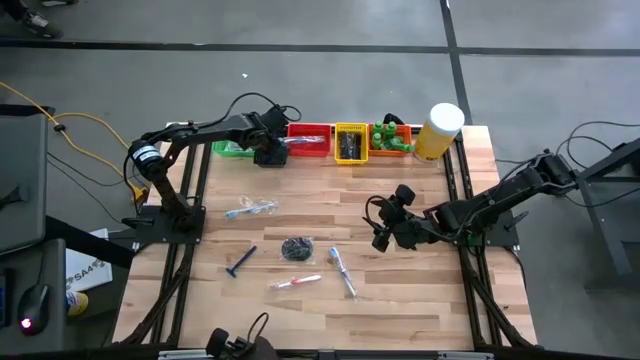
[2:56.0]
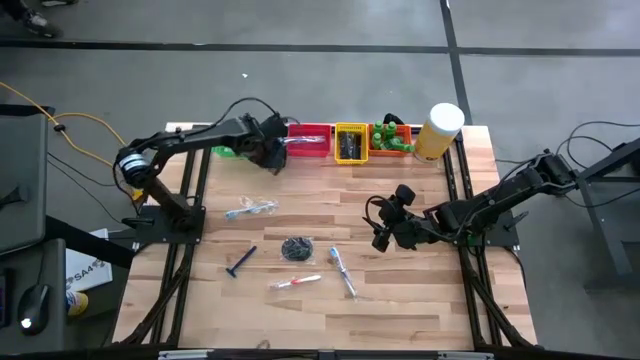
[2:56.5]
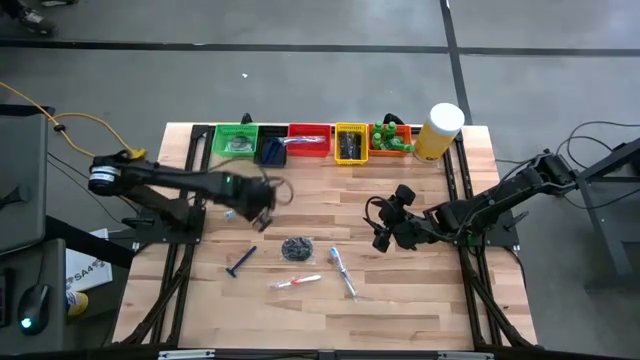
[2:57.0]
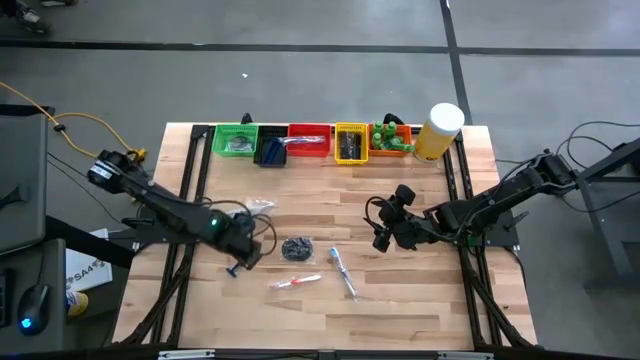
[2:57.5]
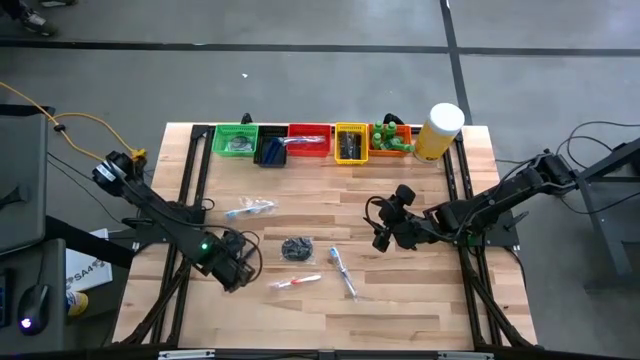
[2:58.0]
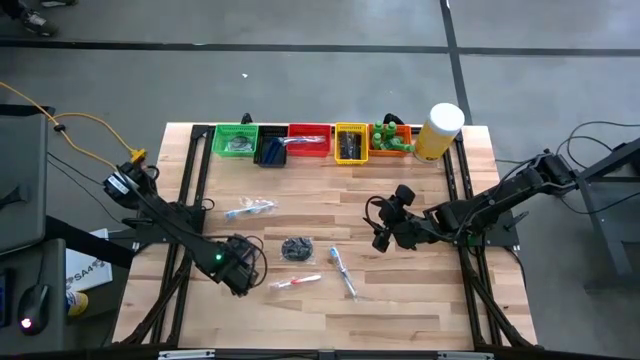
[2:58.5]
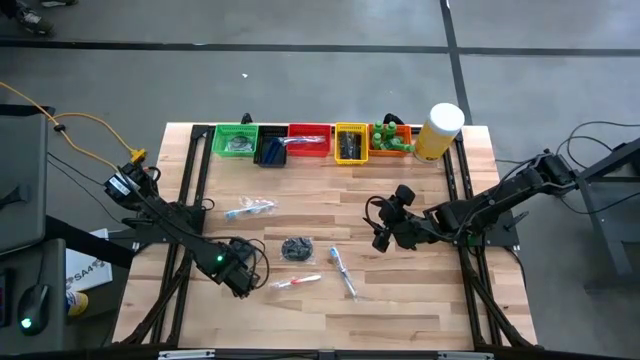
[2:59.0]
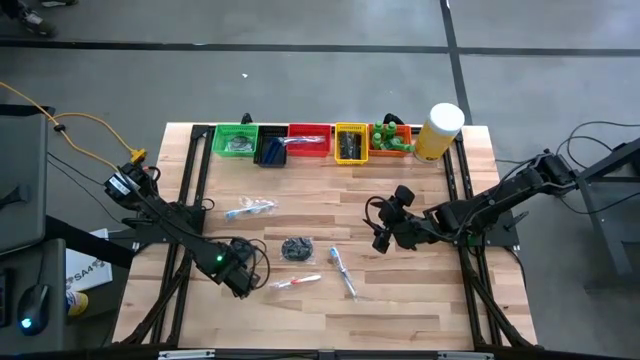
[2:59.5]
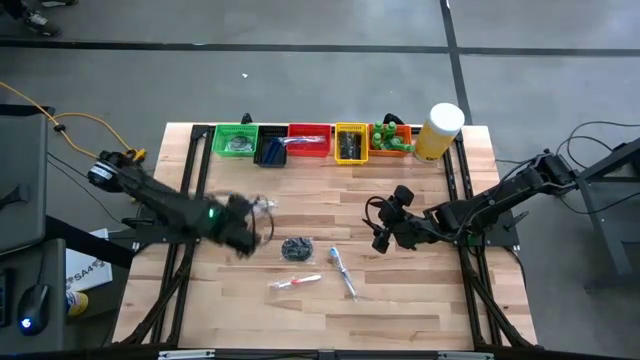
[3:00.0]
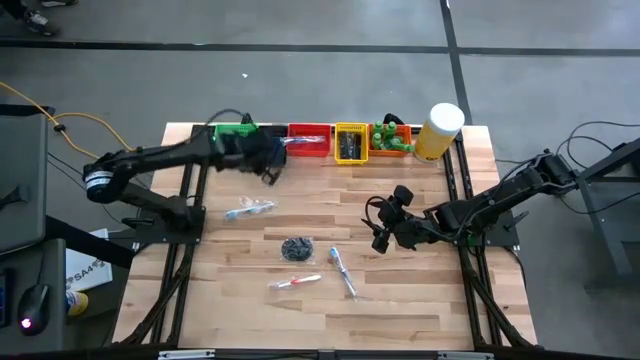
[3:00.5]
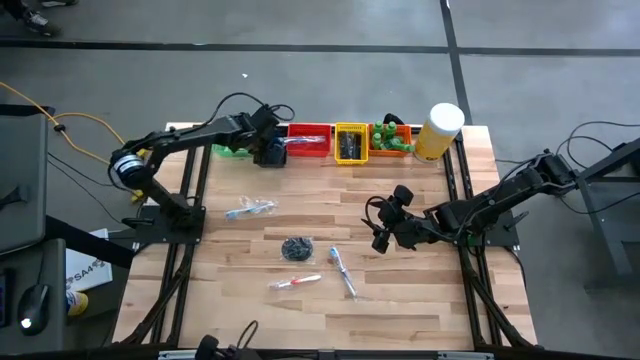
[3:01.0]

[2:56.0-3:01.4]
Task: Pick & Place Travel size toiletries
Put the blue razor into the black basket

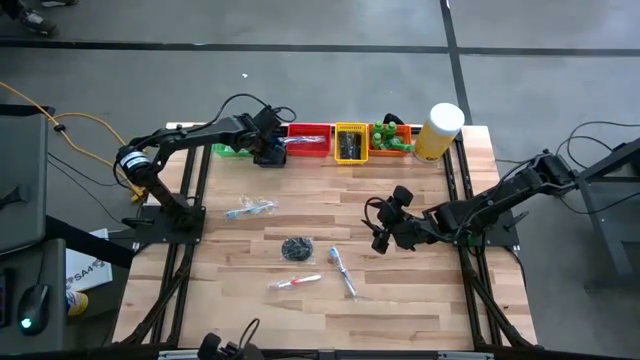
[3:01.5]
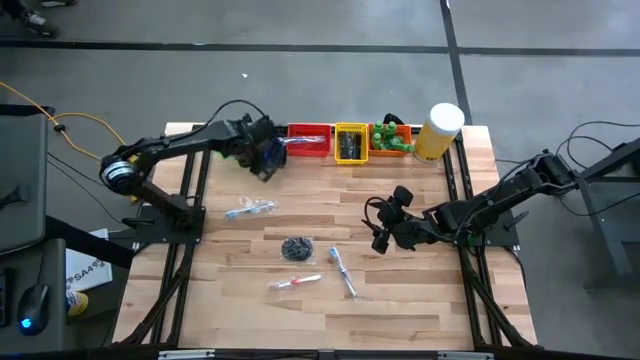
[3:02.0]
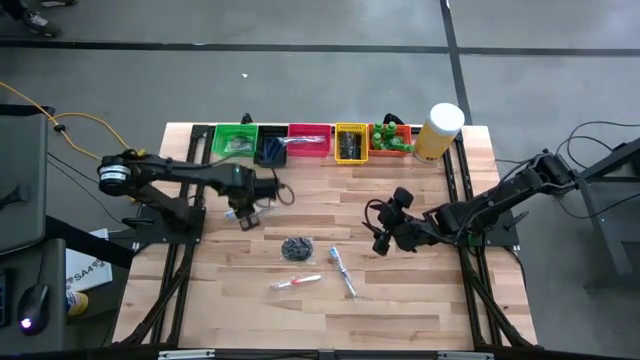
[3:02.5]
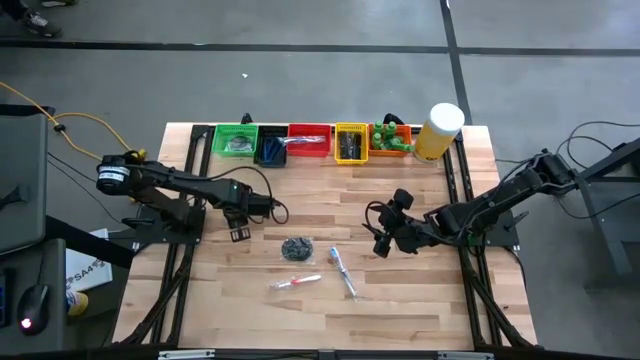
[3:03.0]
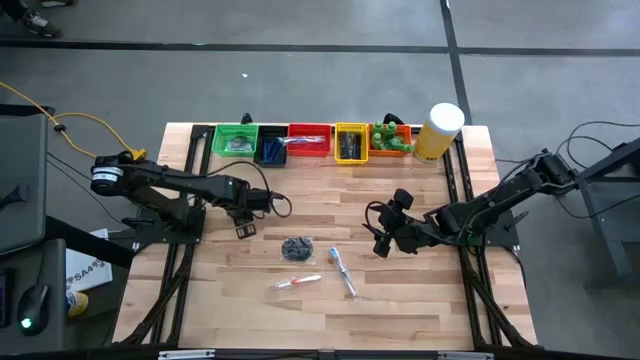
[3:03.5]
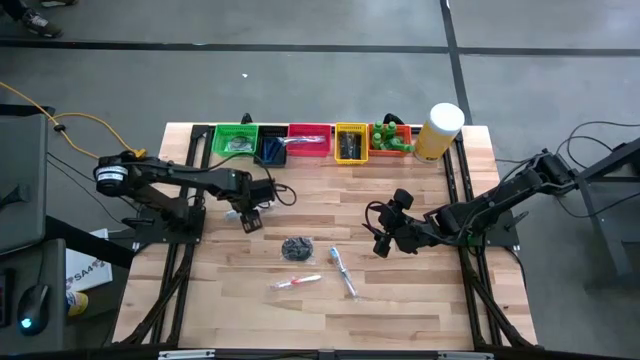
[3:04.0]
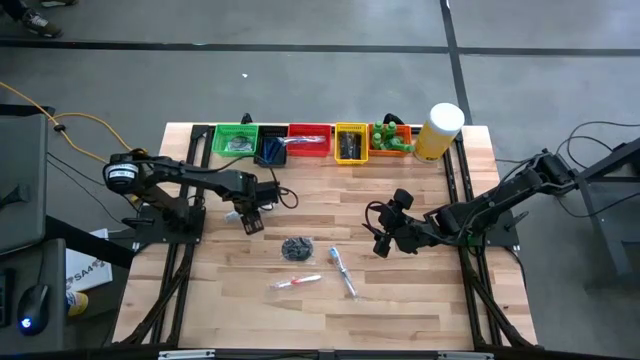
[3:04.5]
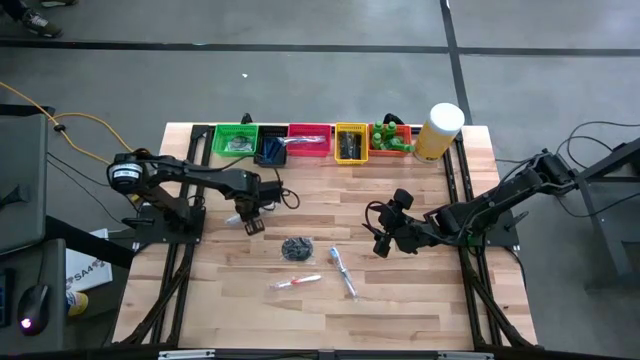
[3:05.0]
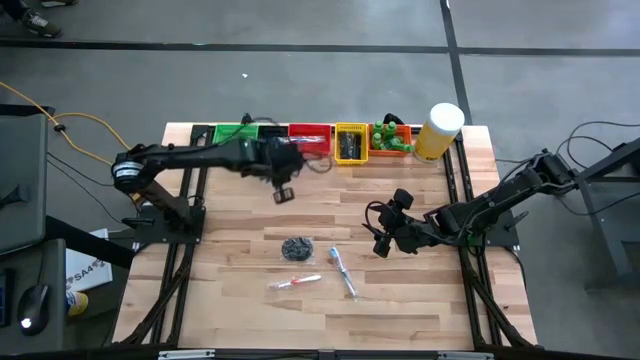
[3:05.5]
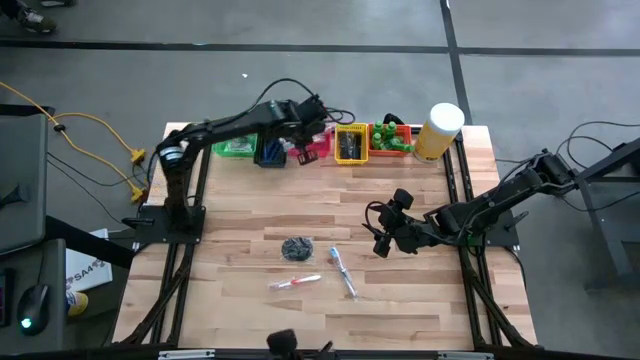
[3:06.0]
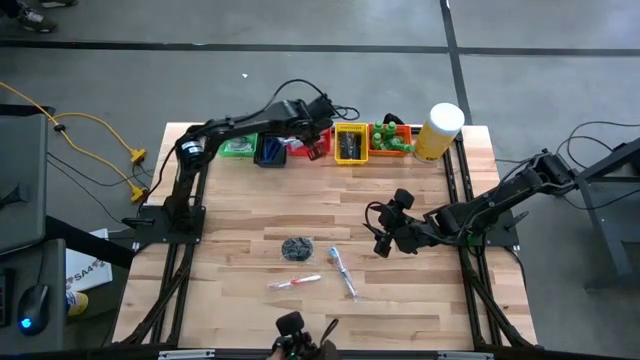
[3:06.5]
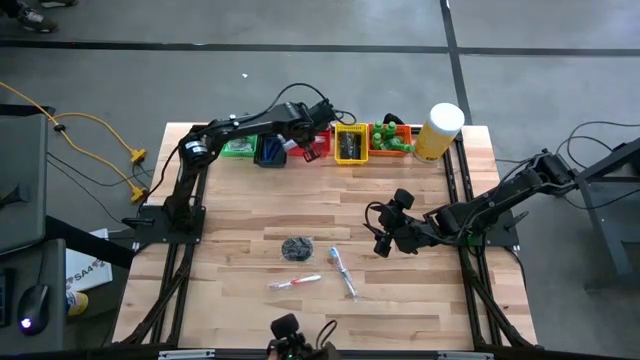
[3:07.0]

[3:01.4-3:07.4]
Put the blue toothbrush into the red basket

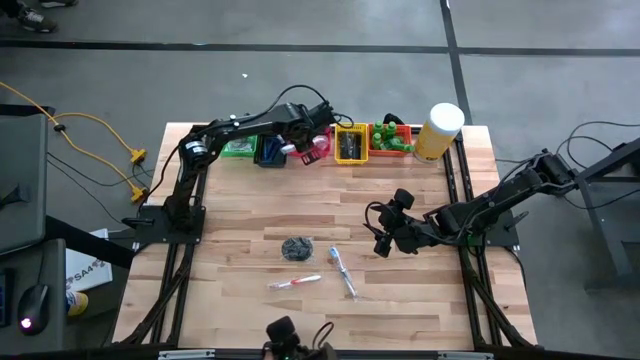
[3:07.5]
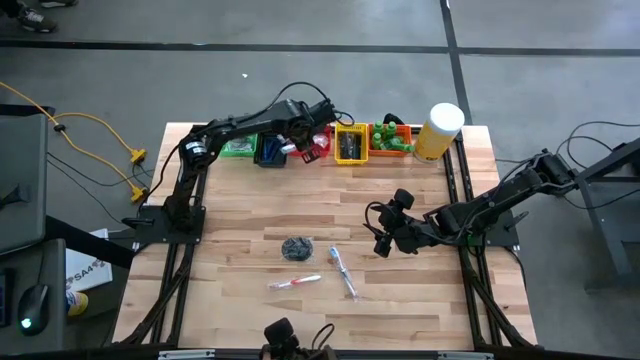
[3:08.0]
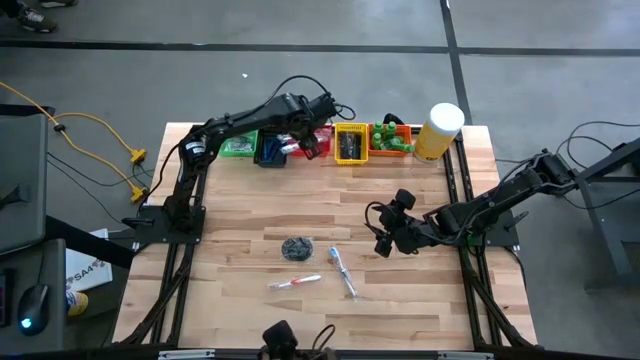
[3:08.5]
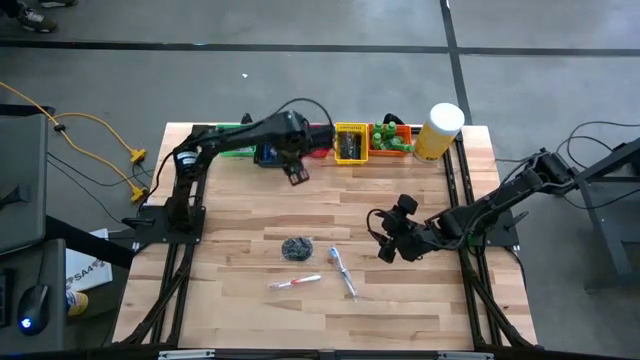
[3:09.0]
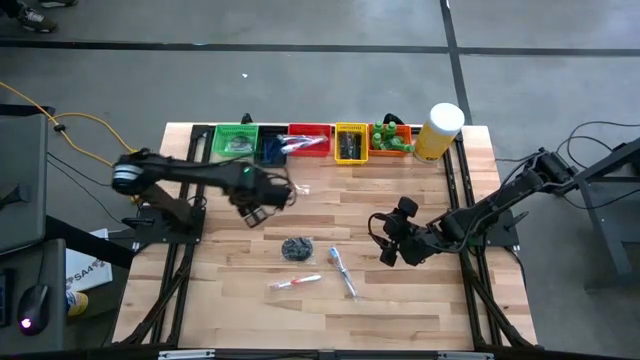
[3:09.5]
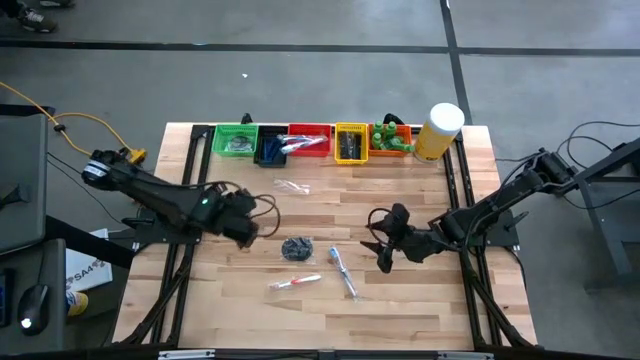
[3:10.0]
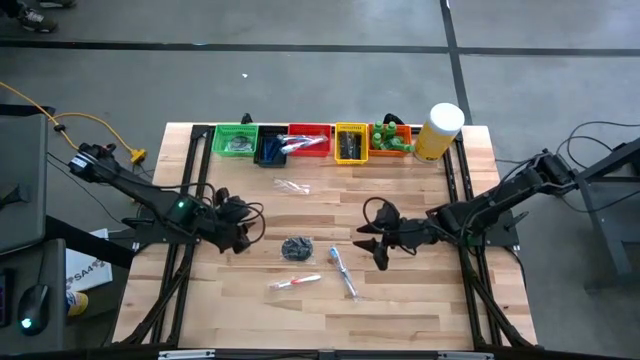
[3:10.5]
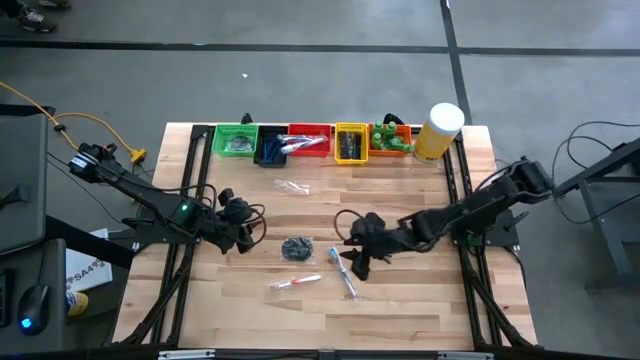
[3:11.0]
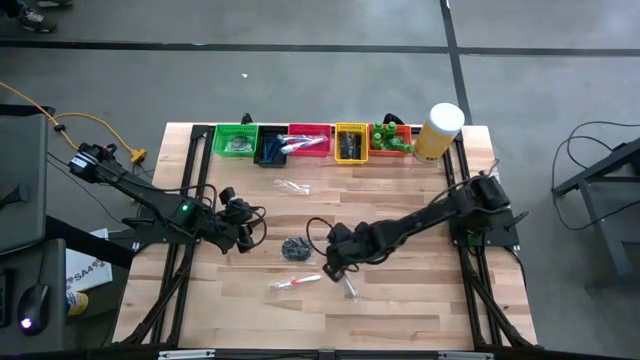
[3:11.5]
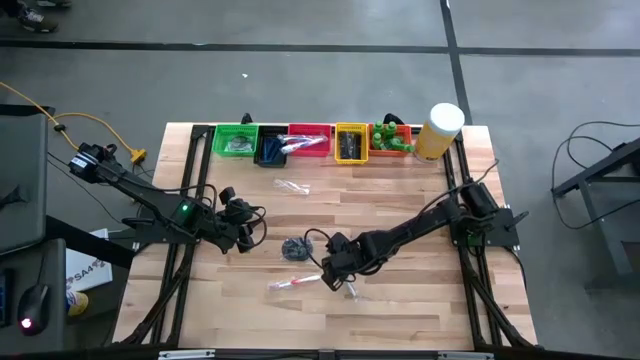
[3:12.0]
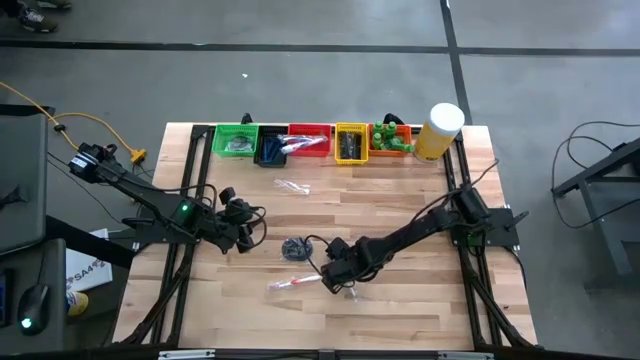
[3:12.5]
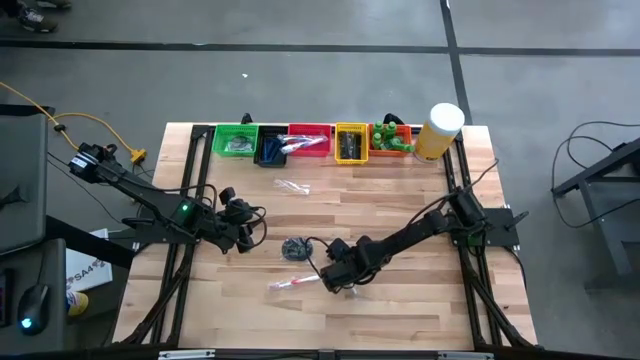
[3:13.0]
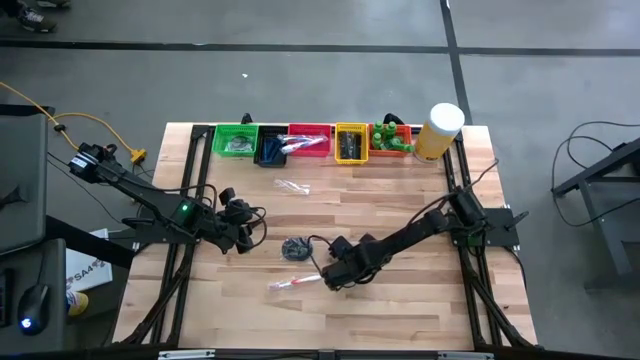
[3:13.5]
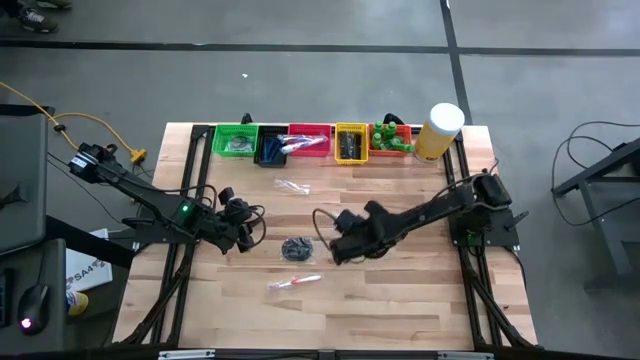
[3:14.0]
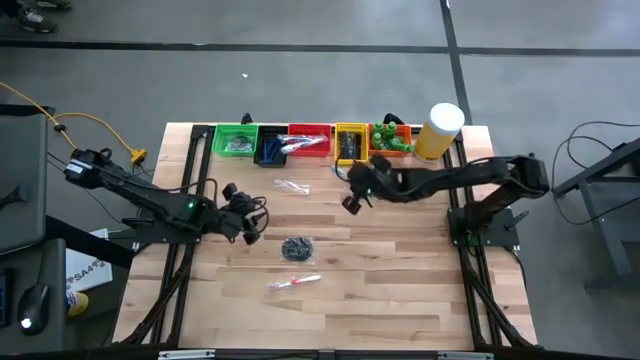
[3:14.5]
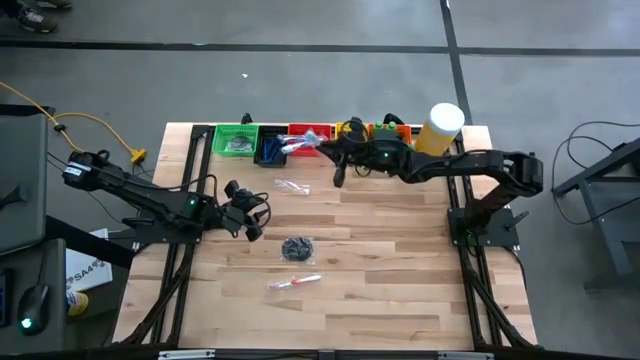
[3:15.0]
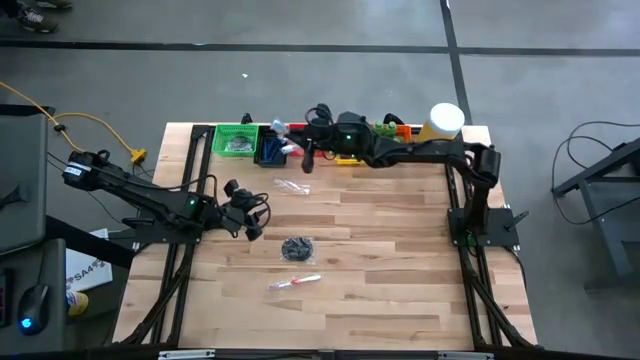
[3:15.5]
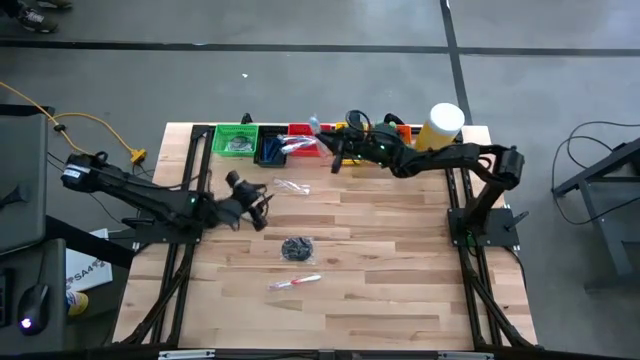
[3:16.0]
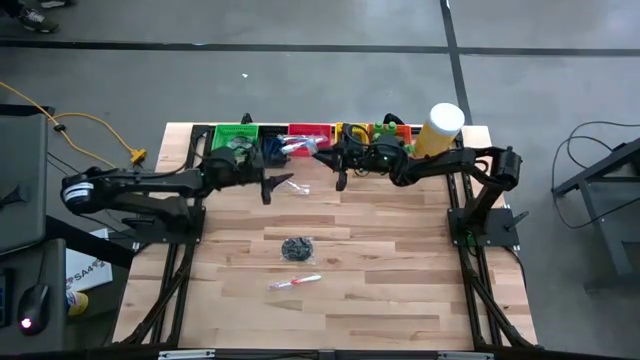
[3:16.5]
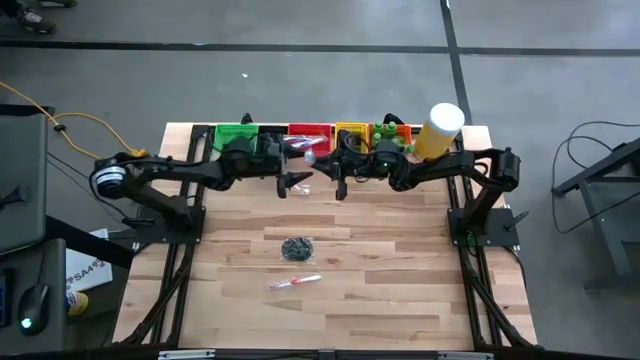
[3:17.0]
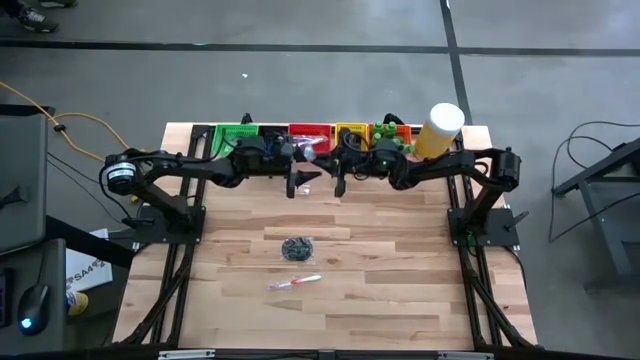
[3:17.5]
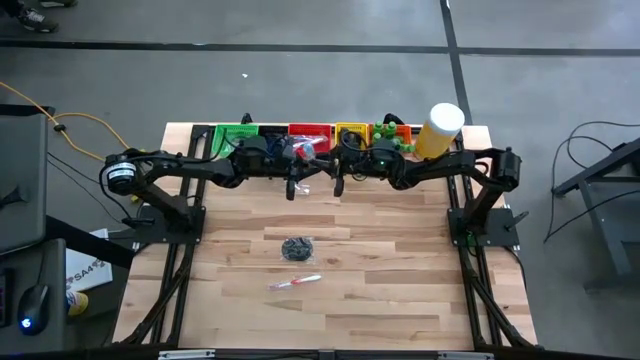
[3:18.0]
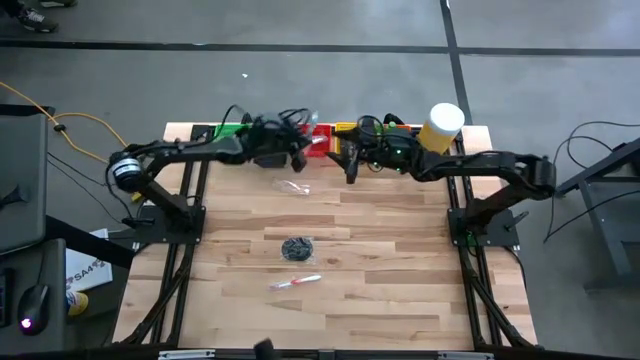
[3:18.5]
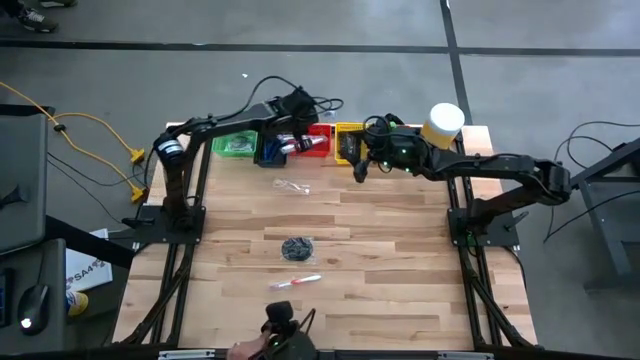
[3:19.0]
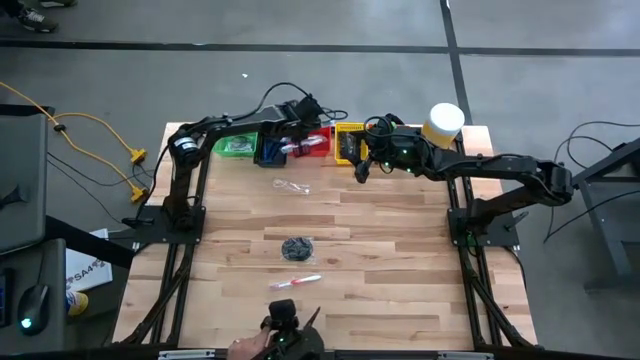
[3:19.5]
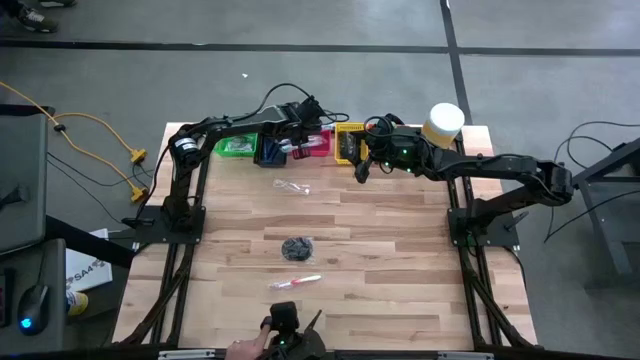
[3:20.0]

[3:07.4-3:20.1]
Put the blue toothbrush into the red basket
